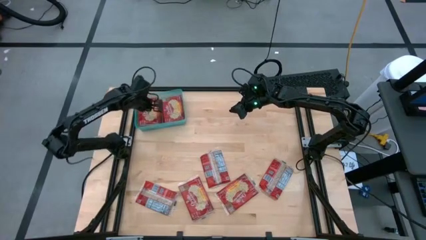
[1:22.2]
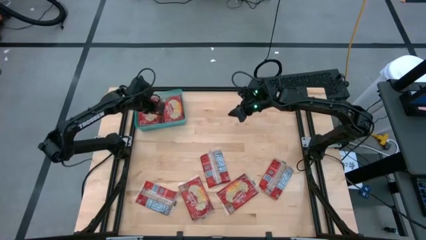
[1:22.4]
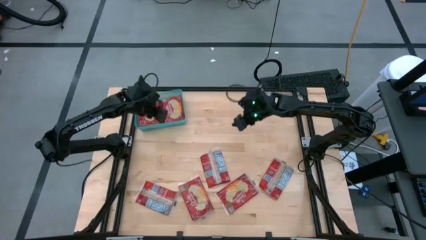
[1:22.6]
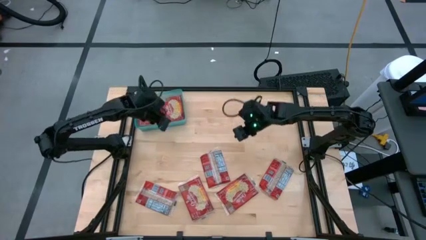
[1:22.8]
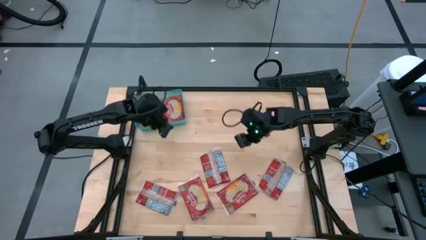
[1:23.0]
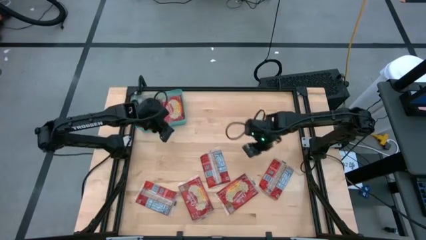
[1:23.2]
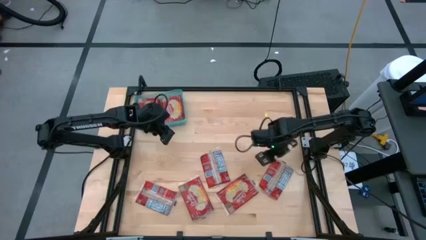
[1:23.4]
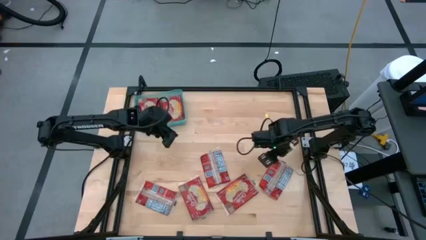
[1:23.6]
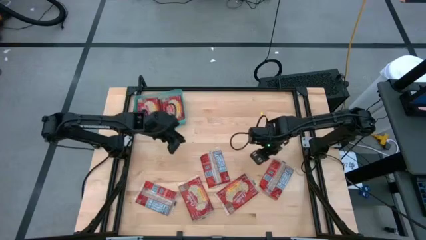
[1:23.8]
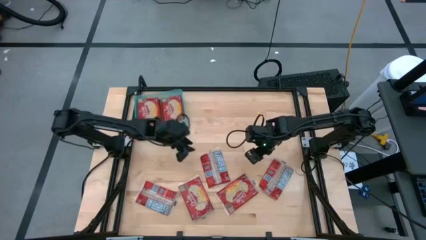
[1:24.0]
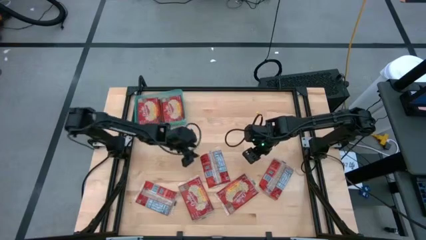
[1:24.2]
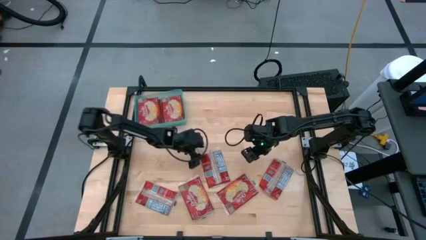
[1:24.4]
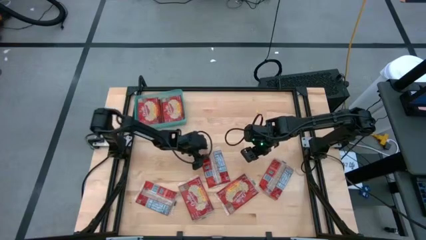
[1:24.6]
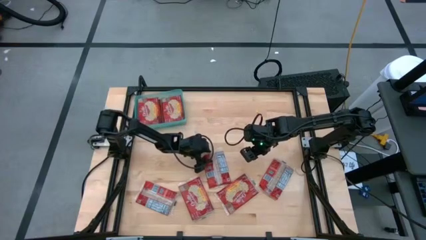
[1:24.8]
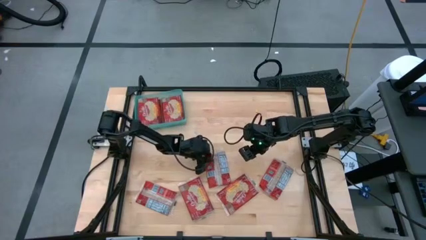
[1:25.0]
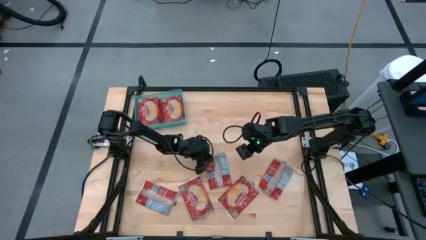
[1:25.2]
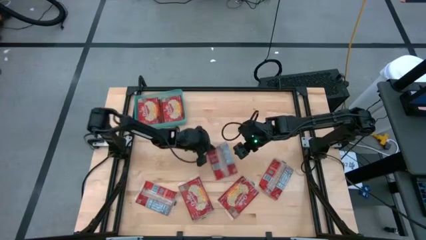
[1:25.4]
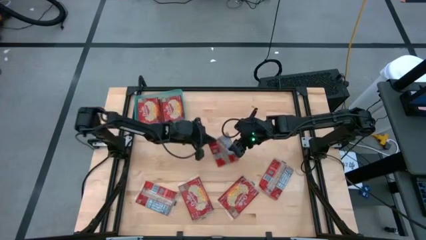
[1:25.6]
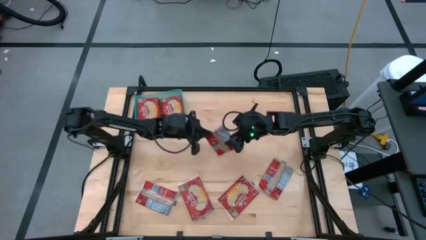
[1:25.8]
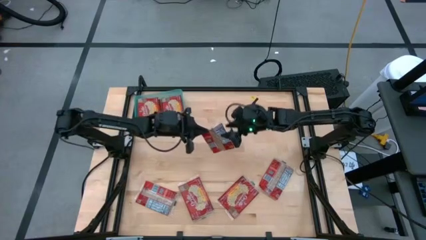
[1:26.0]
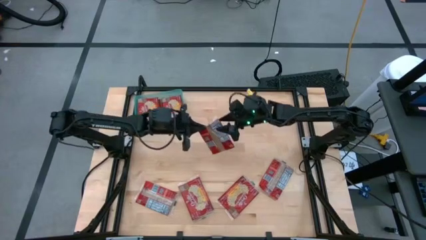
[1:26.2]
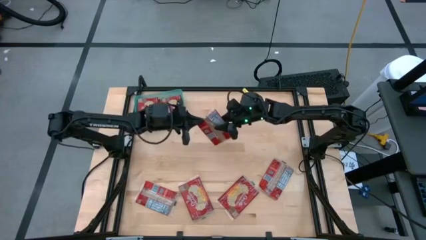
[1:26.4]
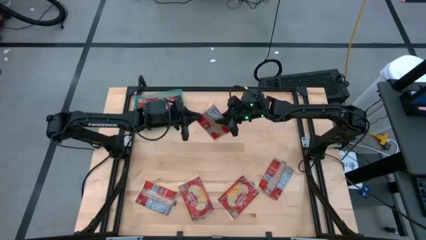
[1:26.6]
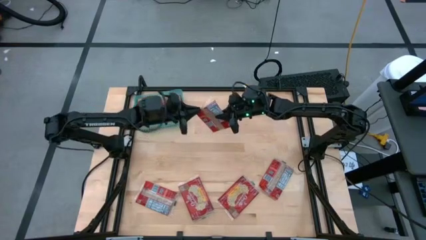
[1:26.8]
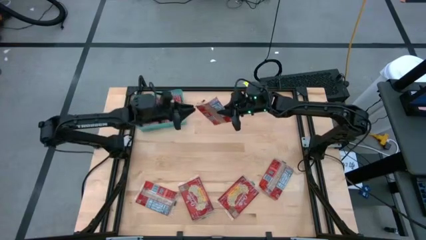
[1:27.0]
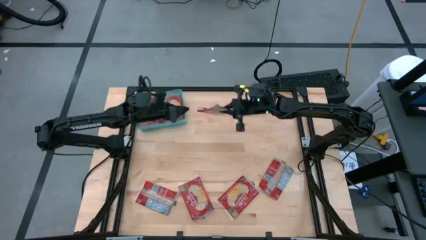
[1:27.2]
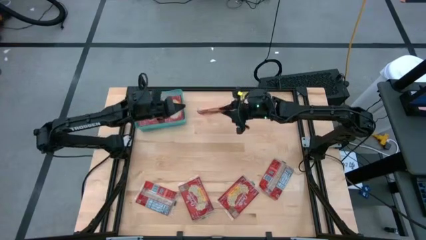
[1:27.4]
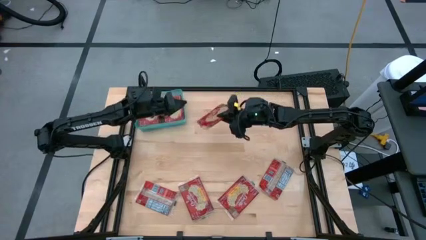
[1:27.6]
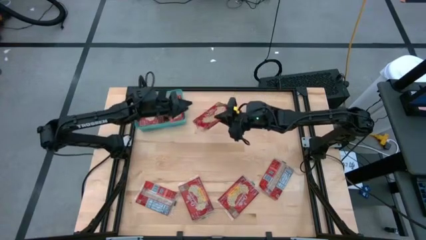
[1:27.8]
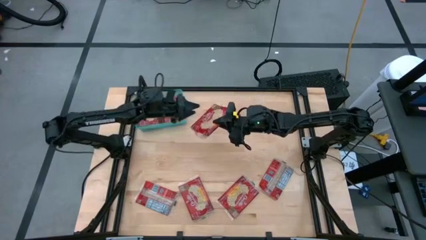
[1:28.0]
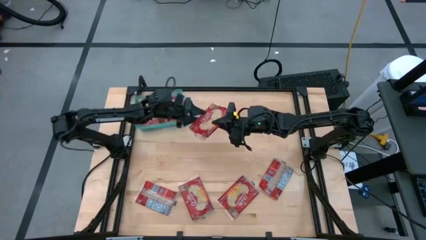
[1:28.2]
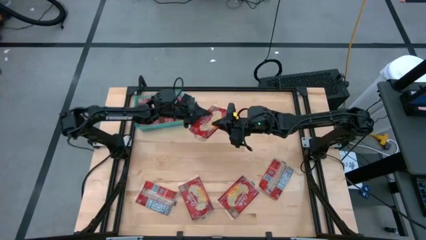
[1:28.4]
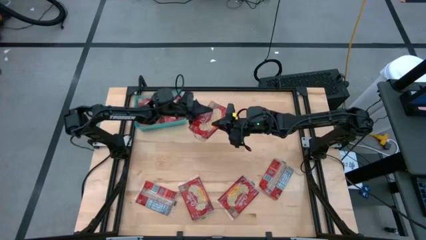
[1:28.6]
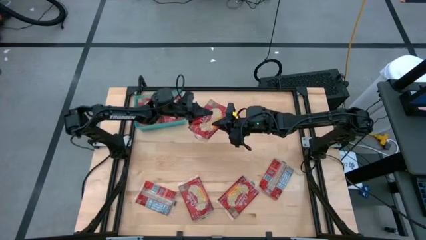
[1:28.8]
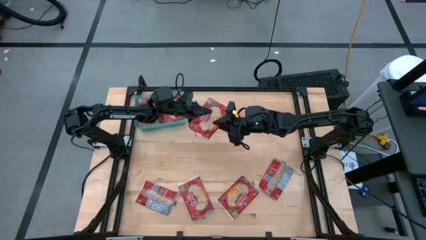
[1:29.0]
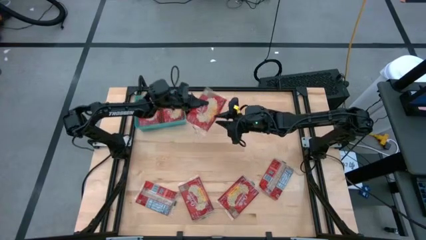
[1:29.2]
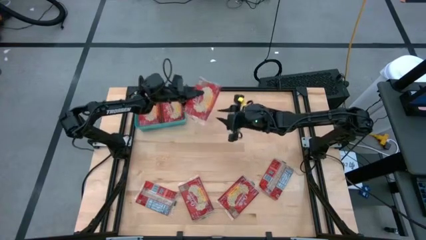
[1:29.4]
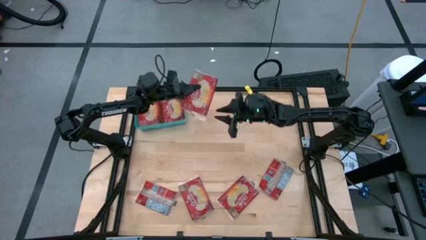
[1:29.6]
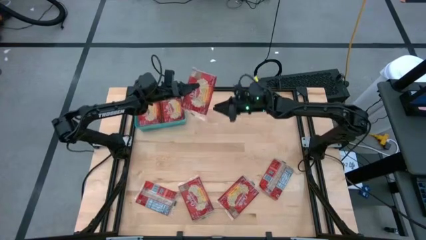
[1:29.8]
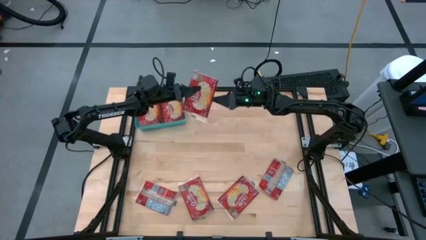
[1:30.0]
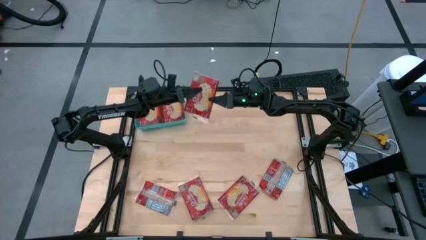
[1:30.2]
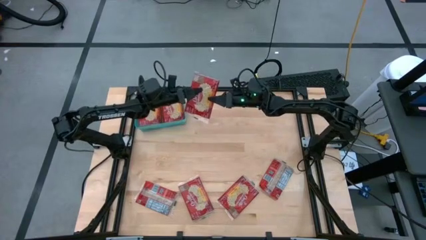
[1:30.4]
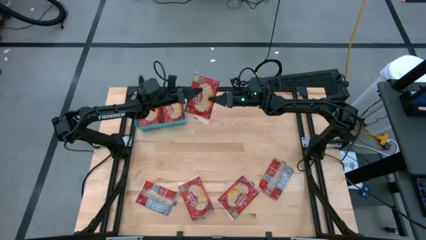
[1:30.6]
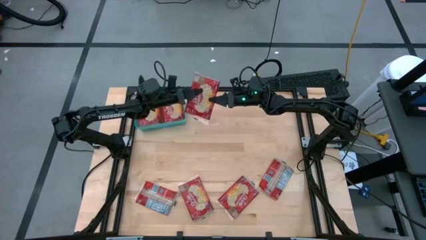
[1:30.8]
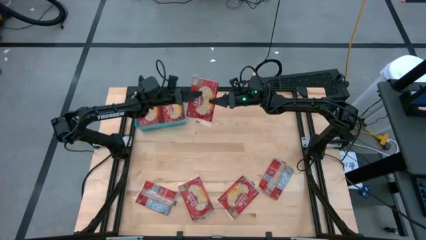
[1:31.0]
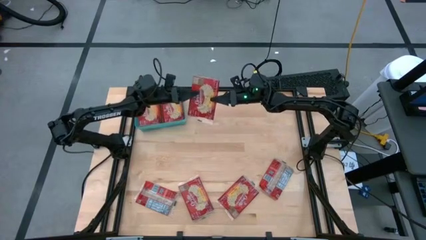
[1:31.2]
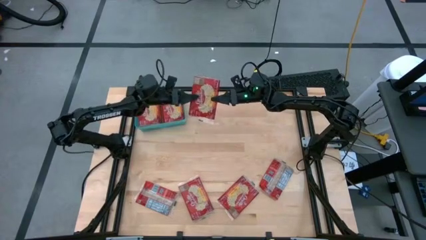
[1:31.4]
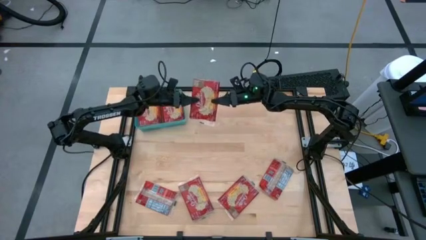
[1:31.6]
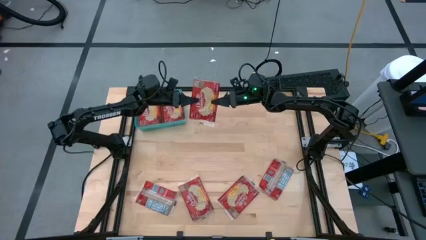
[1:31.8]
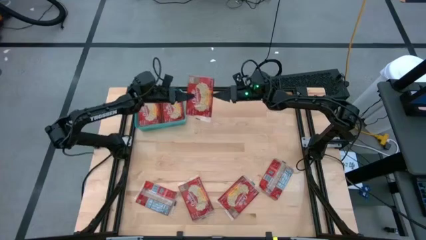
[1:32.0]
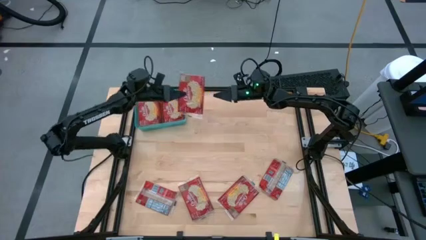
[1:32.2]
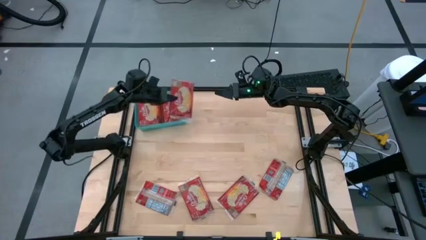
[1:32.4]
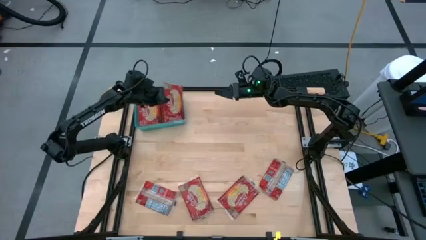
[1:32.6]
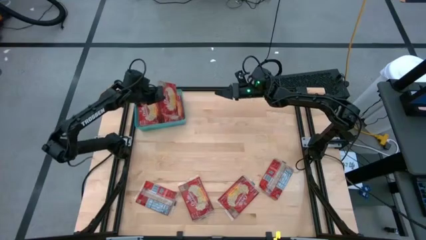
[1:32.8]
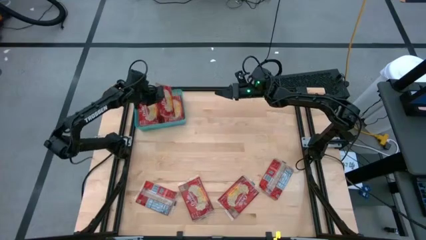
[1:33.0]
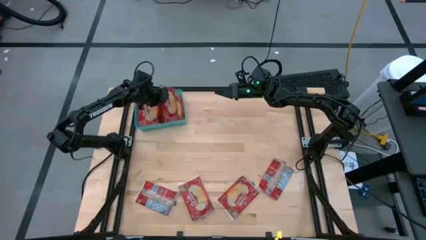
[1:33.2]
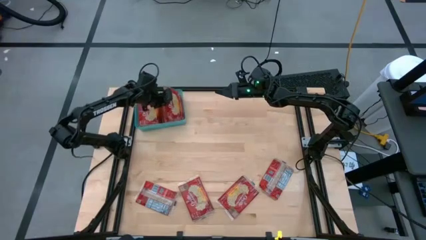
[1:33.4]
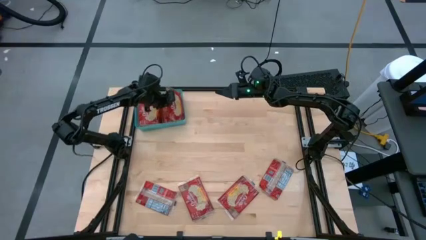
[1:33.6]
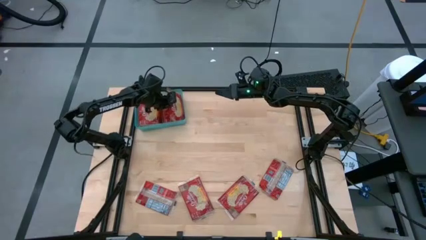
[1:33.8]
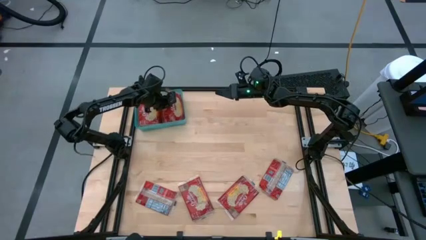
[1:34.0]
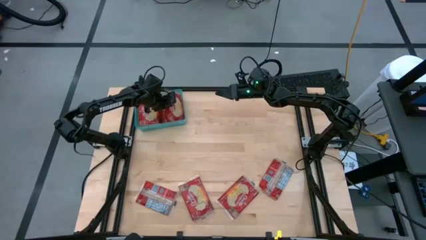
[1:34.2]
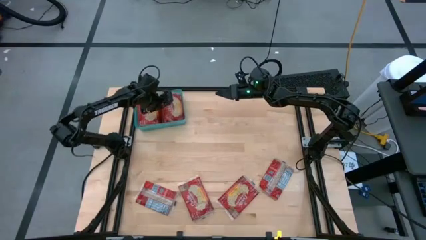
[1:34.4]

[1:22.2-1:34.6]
Task: Sort popcorn bags into baskets
Put the red popcorn bag into the blue bin

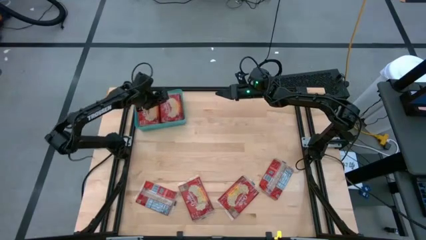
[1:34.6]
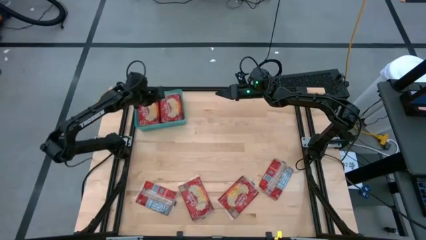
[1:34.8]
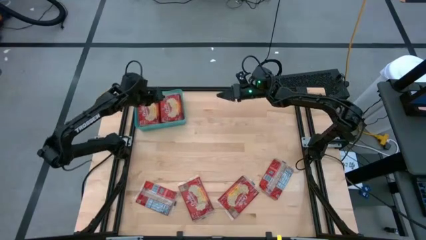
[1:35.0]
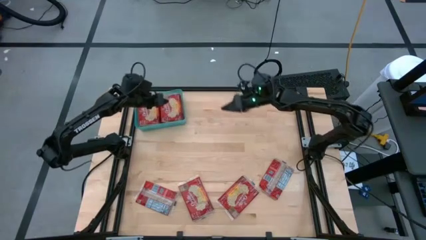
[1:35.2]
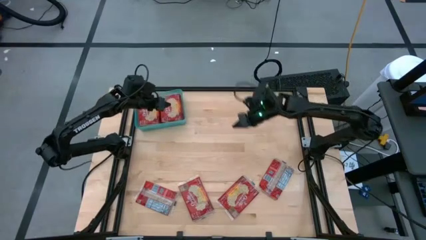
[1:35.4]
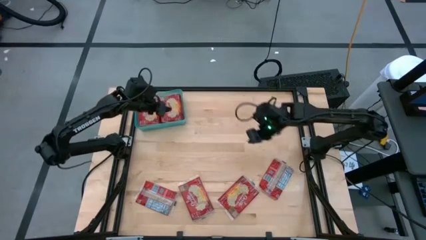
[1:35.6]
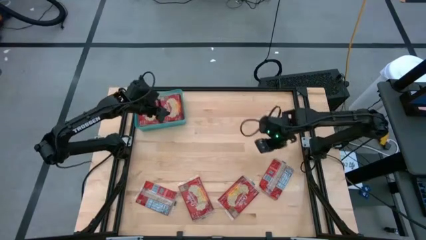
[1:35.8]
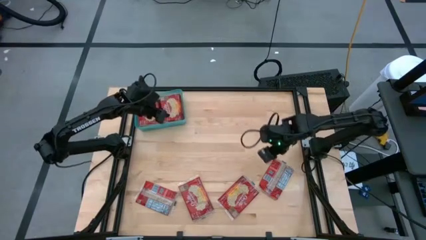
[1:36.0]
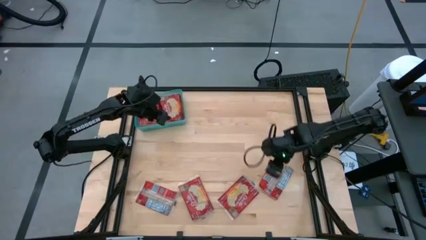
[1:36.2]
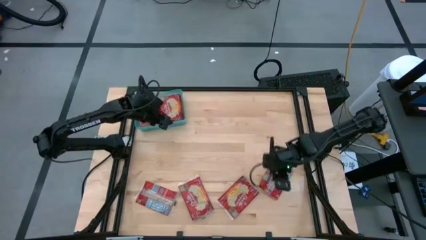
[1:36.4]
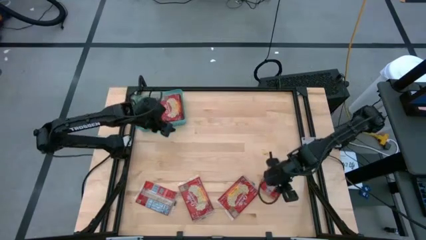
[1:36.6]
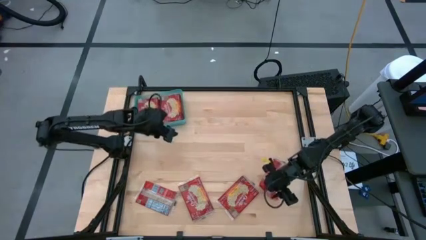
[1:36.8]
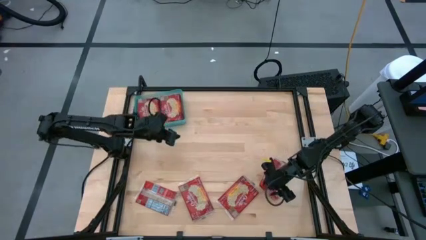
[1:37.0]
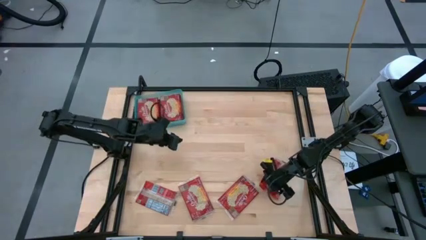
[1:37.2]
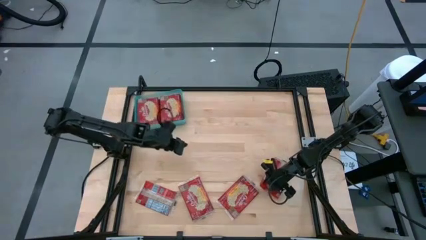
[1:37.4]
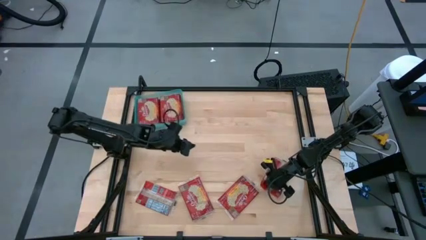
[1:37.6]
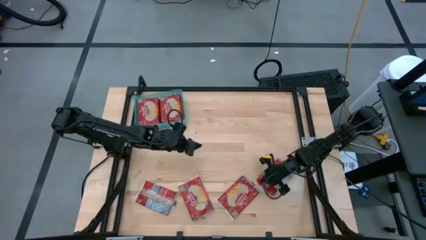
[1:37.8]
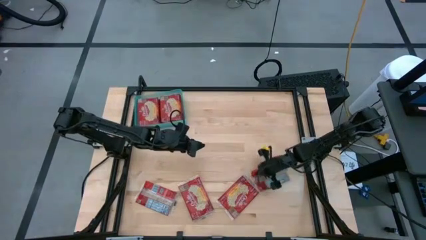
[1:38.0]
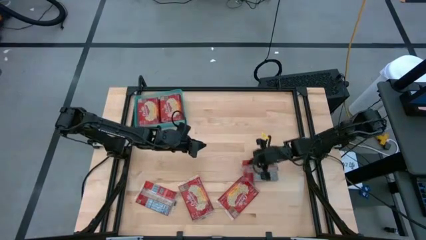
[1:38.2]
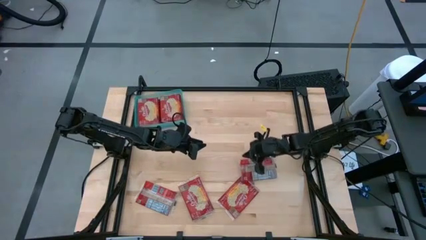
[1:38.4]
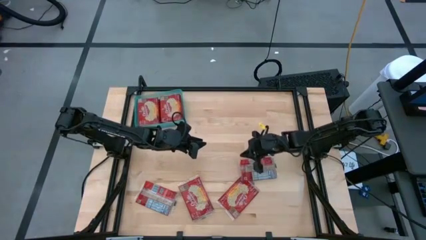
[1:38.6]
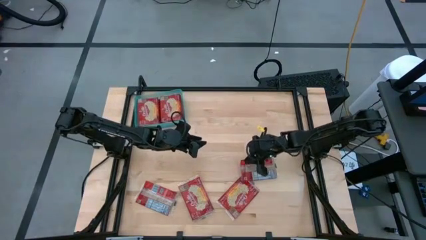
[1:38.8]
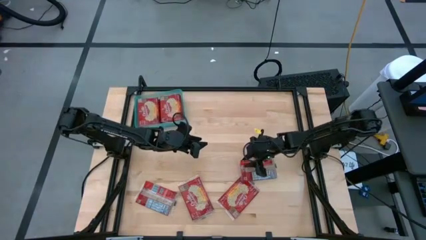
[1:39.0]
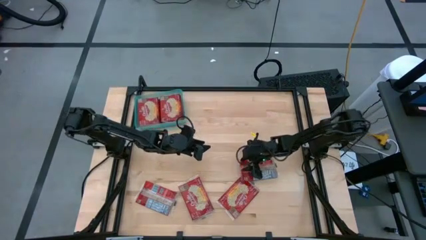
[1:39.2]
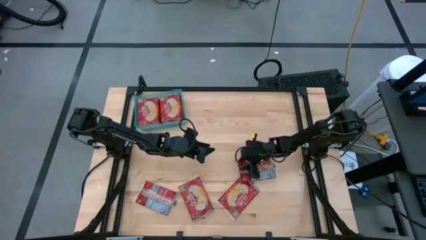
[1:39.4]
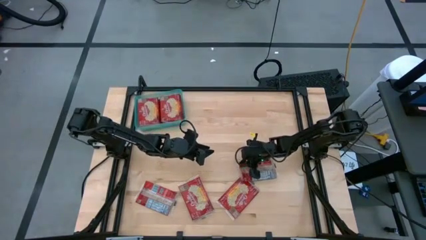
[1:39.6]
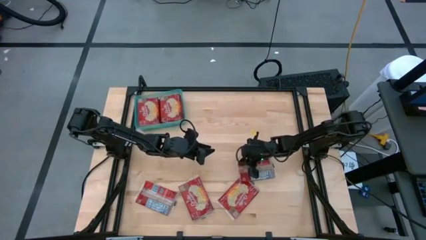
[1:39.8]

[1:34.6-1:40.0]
Put the red popcorn bag into the blue bin
